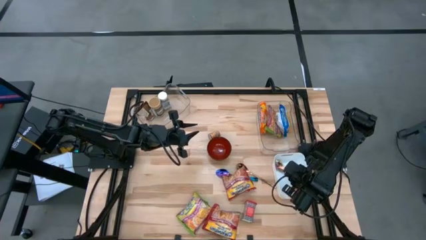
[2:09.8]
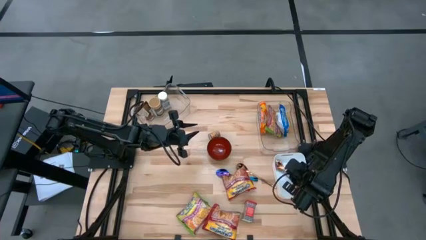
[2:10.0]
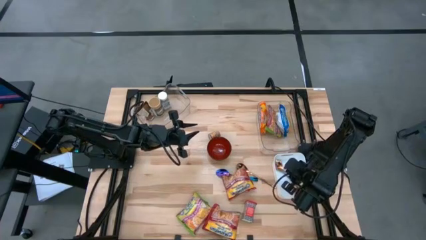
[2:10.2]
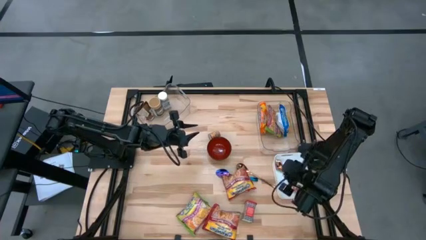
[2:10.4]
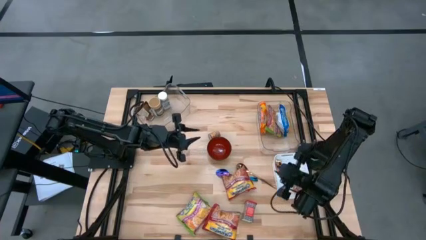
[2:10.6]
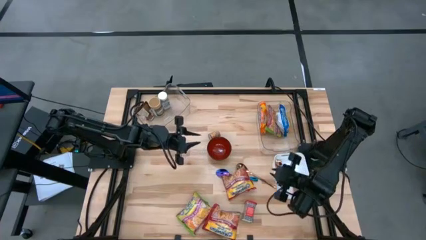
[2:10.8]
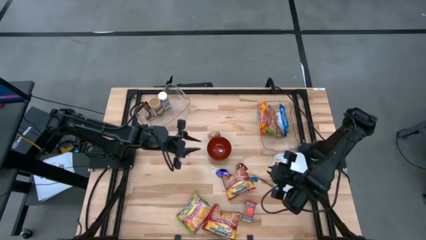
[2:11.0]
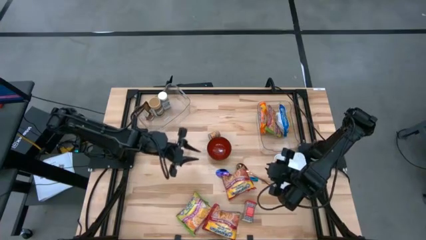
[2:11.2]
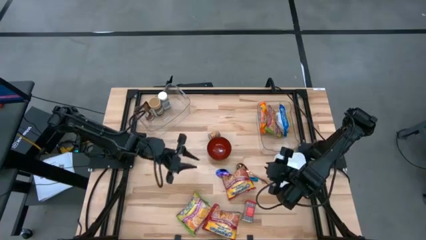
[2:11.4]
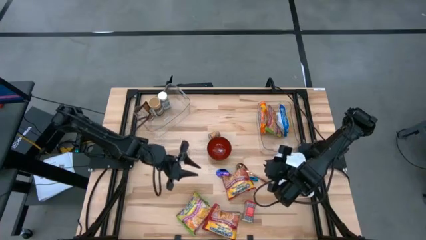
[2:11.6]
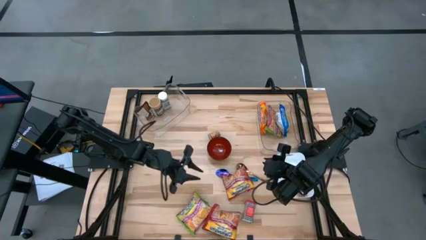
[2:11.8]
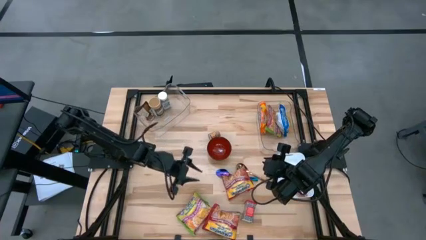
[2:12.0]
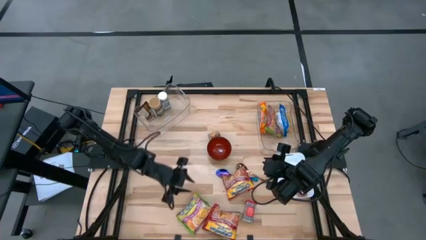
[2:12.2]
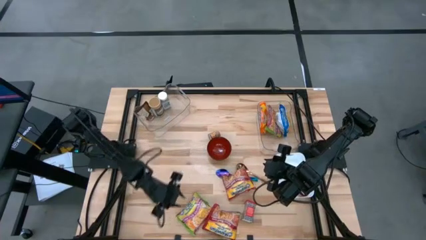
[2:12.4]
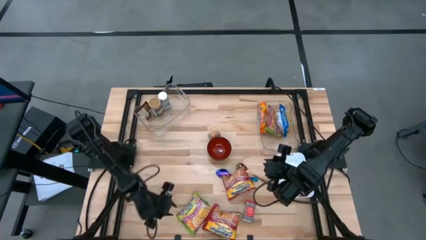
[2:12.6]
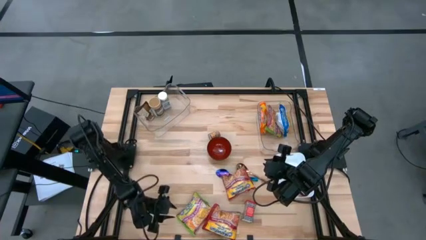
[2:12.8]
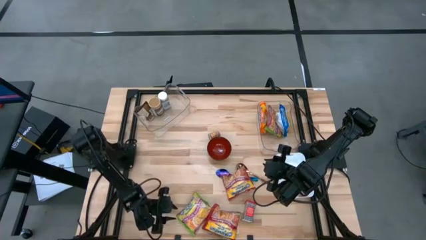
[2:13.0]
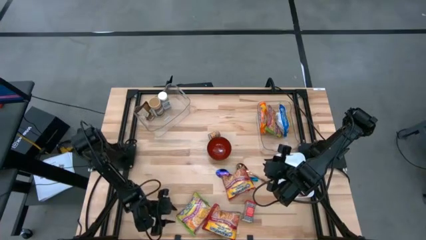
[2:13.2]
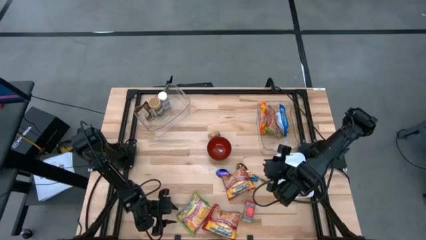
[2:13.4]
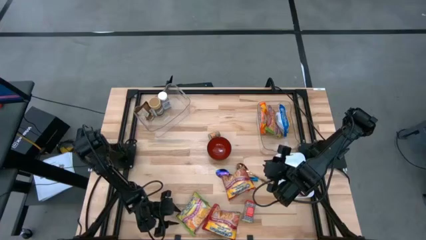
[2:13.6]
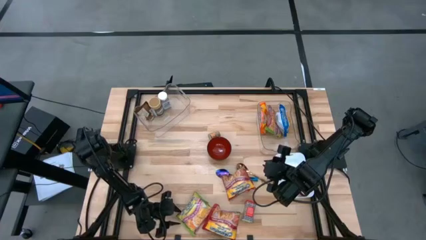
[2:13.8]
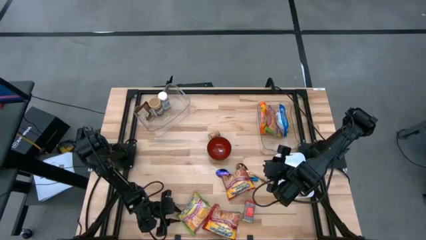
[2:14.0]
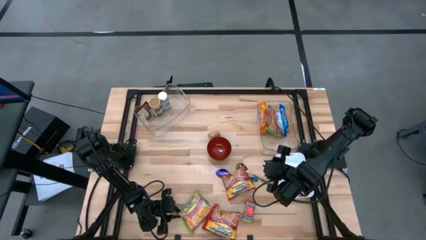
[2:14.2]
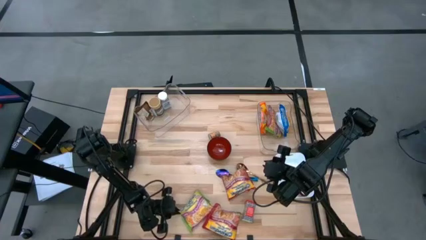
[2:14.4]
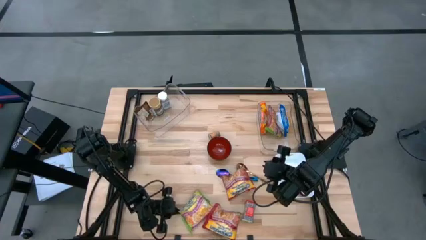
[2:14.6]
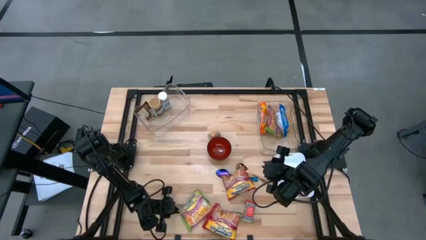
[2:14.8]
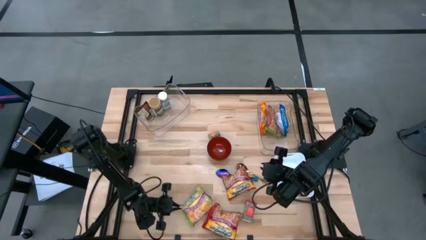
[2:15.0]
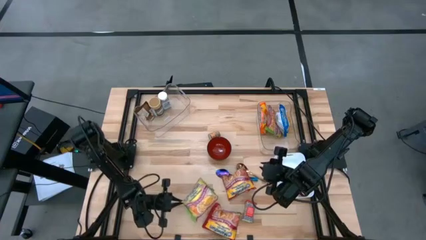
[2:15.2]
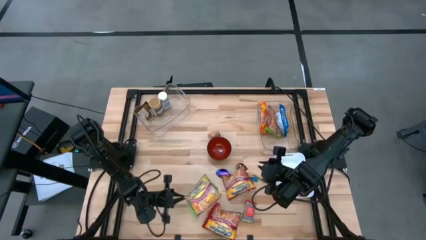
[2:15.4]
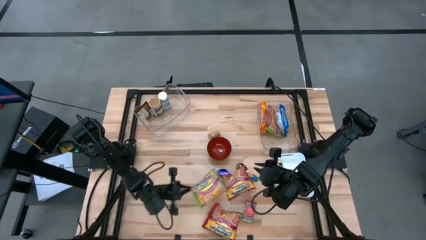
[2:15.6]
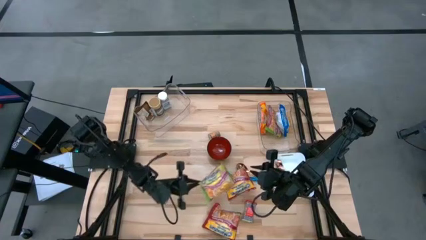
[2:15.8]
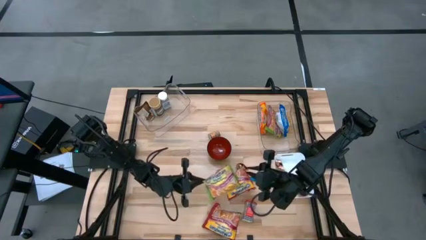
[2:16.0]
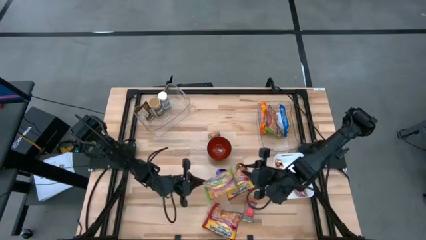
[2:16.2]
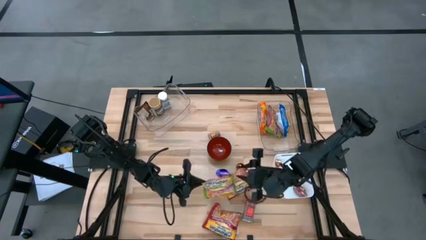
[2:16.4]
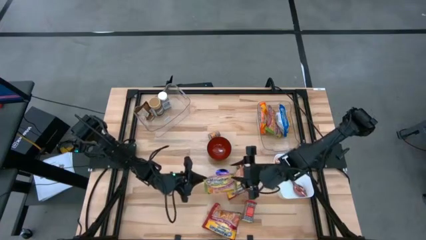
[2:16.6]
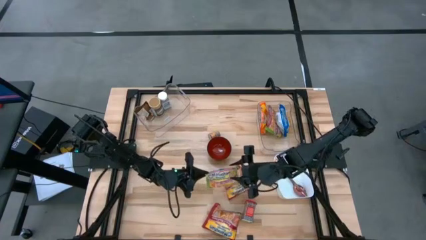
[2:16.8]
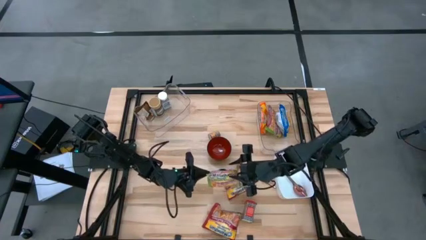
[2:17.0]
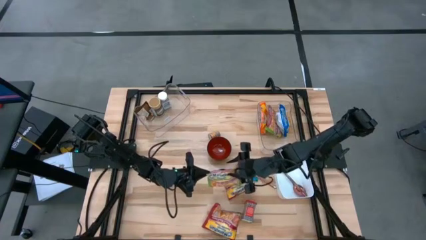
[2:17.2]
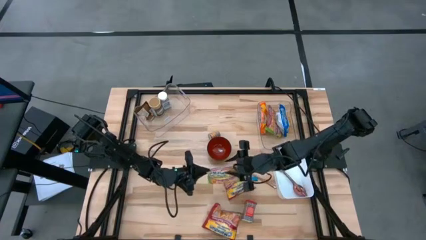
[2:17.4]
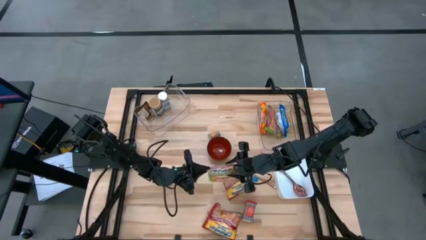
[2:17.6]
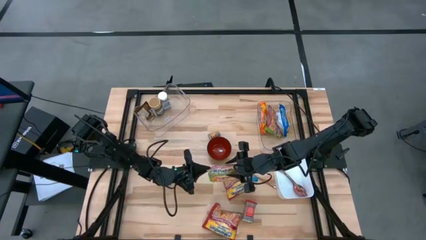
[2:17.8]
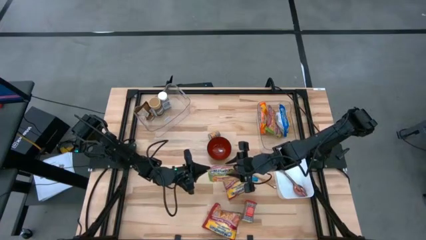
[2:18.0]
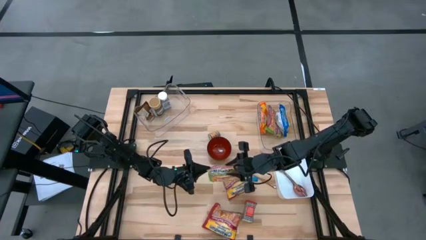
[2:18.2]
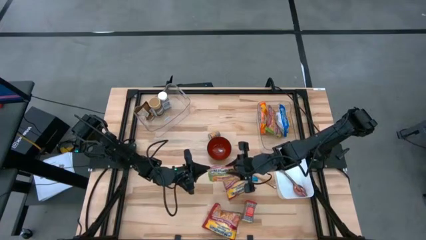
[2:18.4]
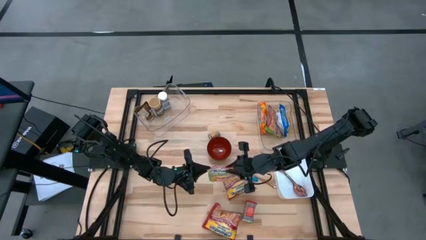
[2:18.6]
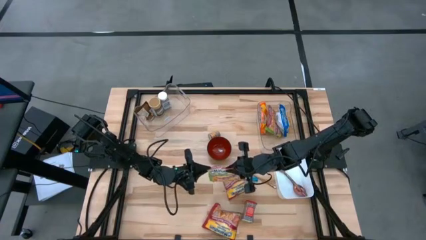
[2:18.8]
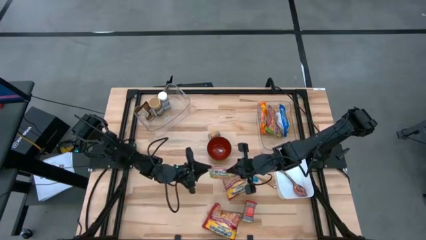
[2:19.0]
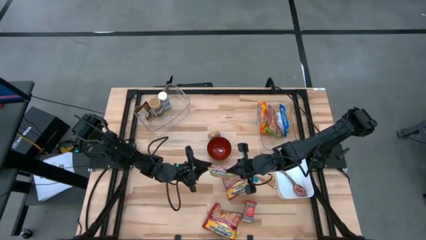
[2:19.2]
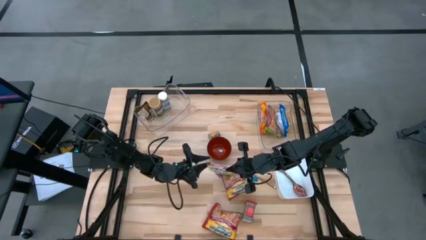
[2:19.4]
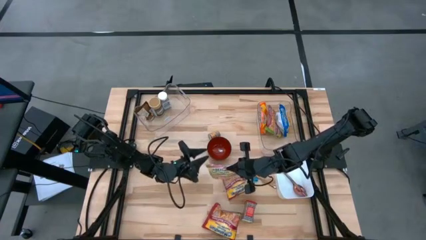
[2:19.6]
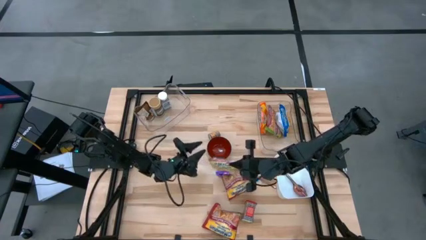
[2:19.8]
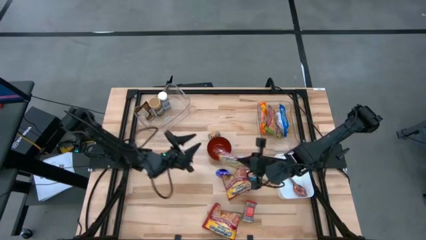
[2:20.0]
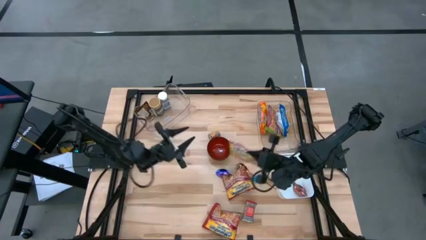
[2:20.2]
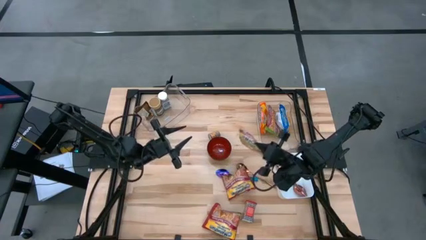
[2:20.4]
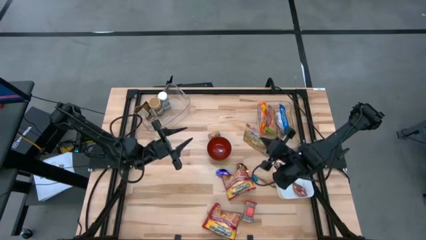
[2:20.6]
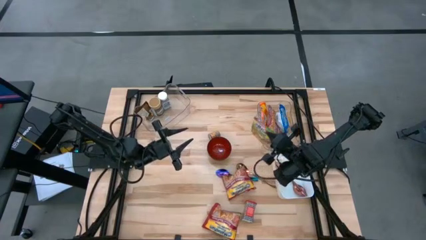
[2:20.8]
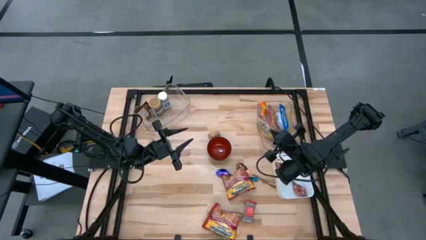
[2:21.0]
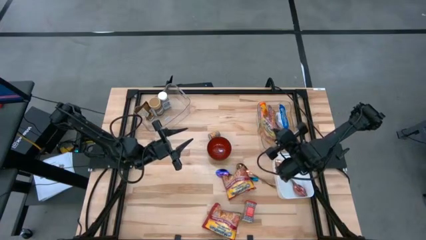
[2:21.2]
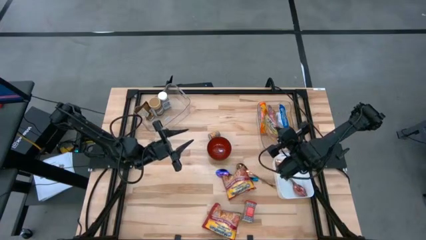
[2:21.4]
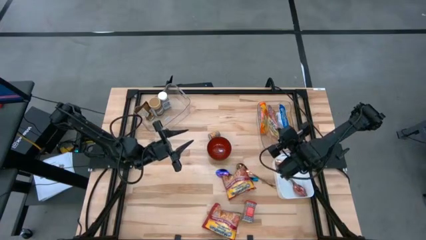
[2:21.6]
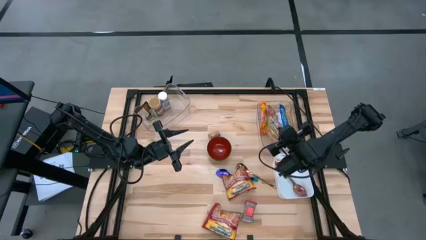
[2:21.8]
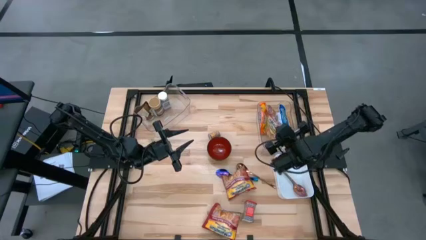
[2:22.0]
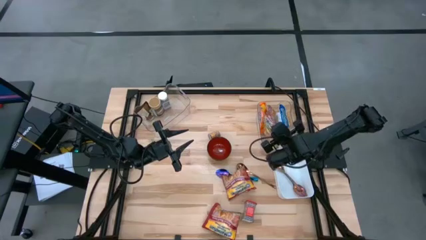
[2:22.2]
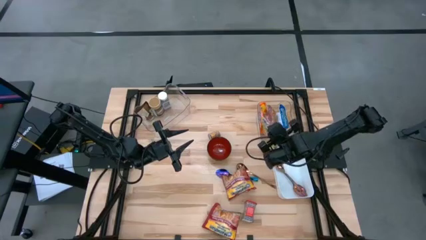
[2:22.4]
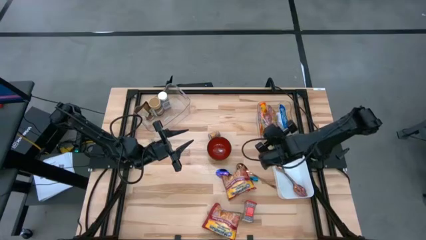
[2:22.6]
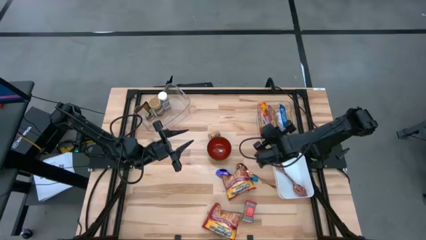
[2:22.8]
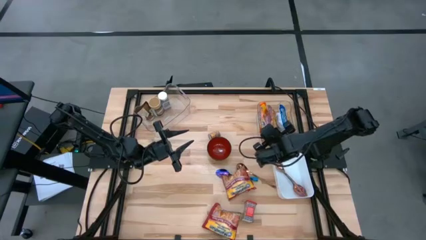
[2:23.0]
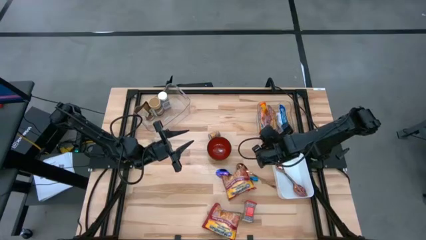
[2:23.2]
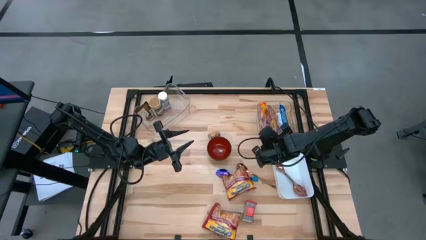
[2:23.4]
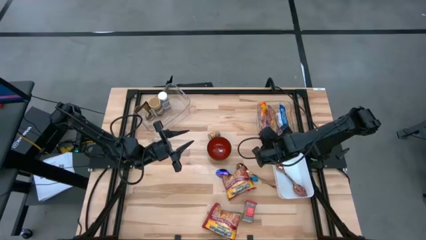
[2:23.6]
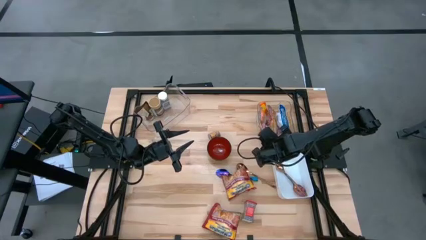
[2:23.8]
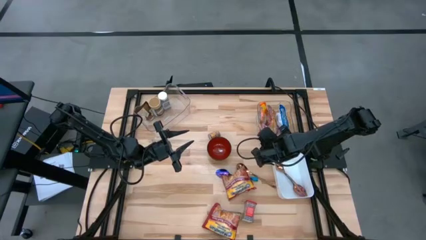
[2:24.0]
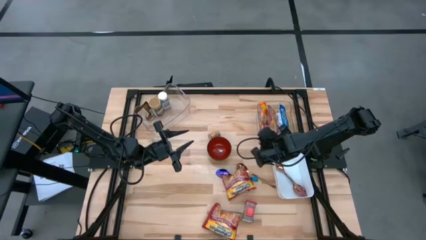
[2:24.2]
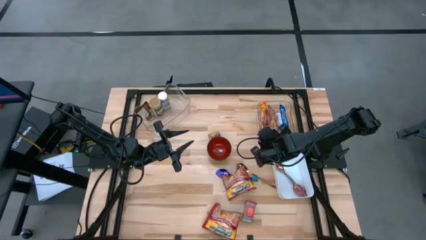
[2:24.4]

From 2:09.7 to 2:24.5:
Task: Pick & Place Food Item
Put the green noodle pack into the right transparent bin

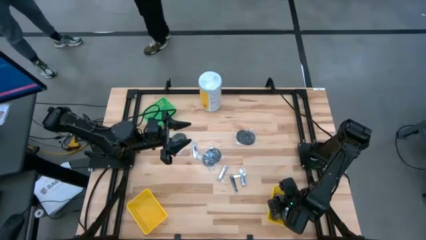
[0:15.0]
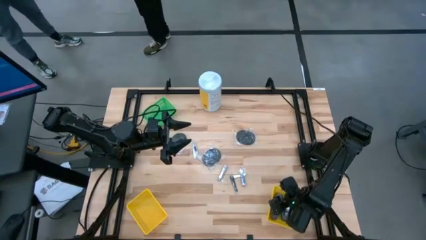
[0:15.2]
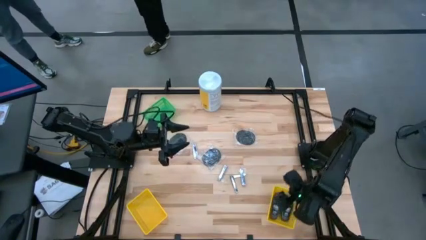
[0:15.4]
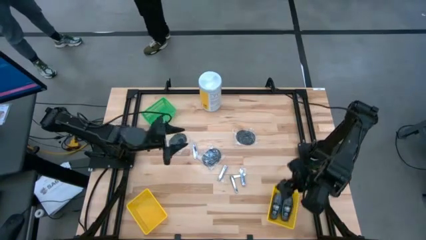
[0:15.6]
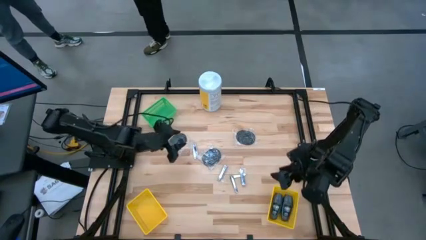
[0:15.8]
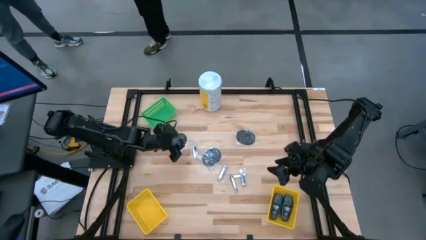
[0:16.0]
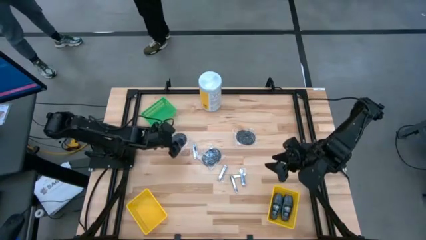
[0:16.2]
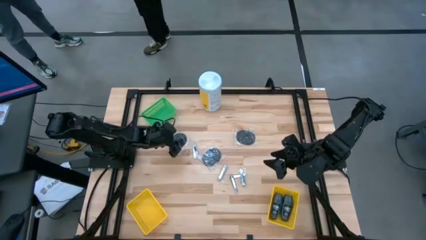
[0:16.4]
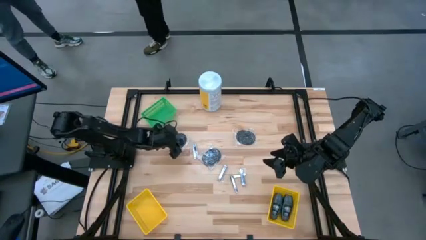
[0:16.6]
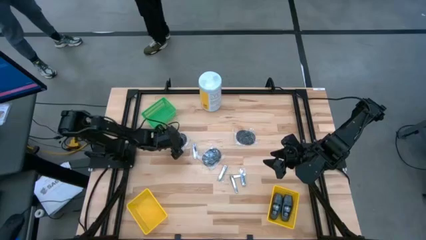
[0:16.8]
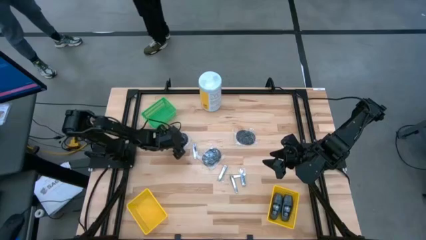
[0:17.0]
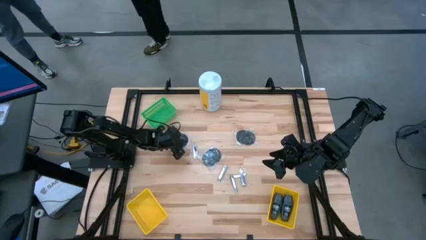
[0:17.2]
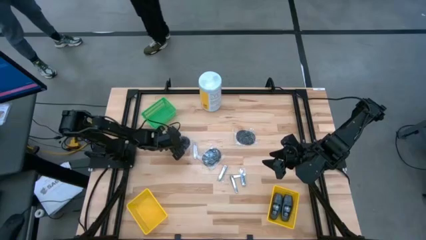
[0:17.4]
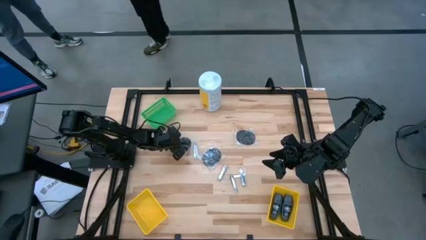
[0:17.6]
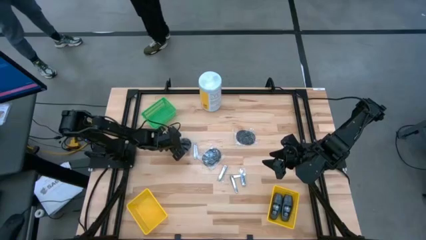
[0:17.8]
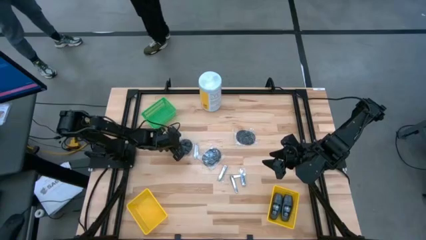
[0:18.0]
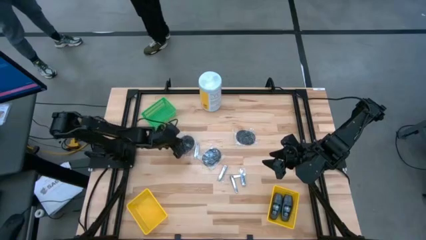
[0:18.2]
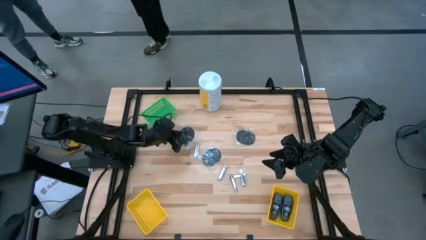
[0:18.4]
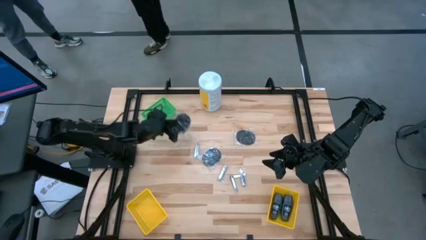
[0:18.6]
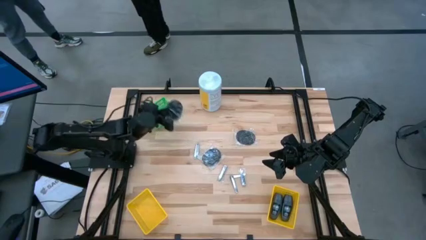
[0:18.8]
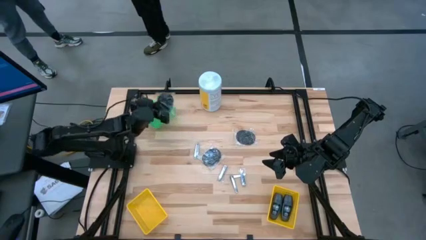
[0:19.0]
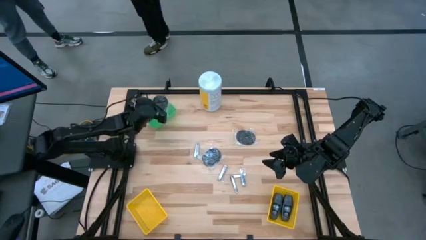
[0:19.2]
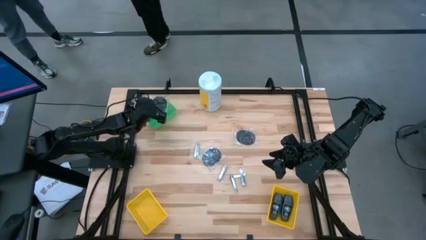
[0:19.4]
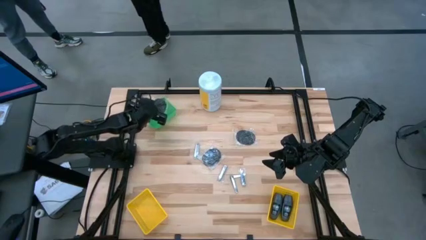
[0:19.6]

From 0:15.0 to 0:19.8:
Task: Pick & Place Travel size toiletries
Put the black hairbrush into the green bin
